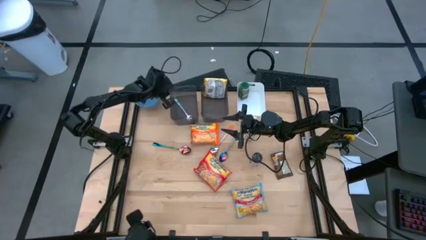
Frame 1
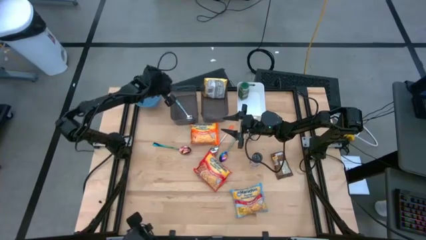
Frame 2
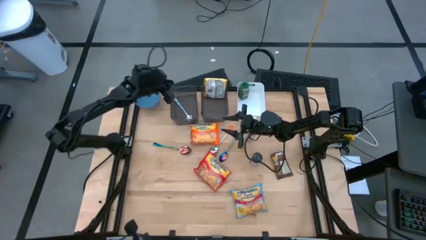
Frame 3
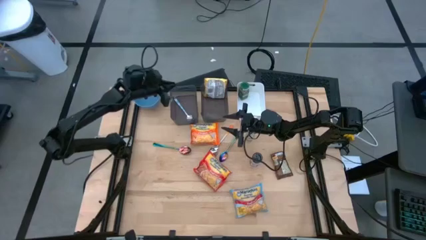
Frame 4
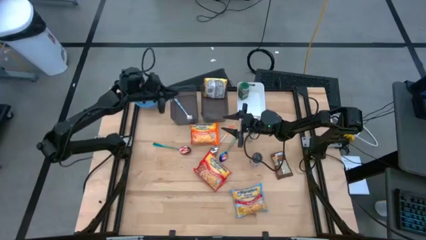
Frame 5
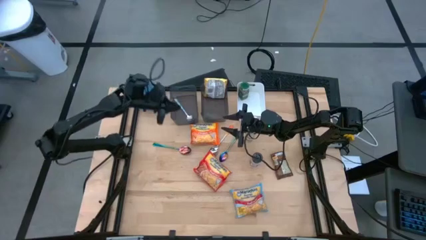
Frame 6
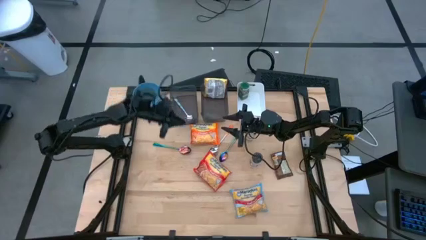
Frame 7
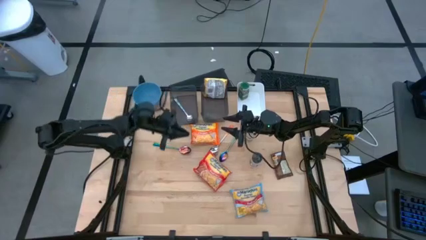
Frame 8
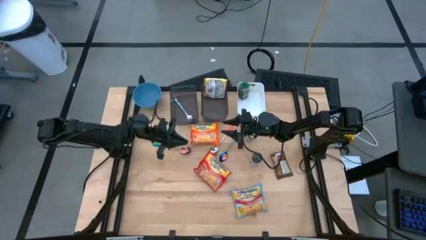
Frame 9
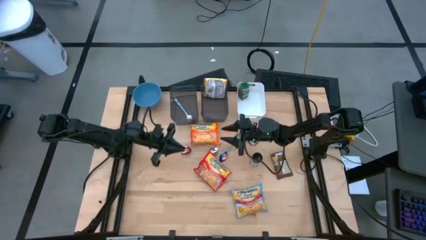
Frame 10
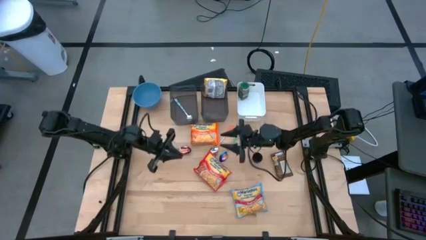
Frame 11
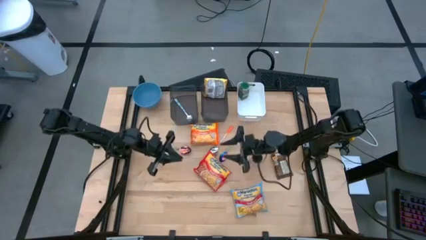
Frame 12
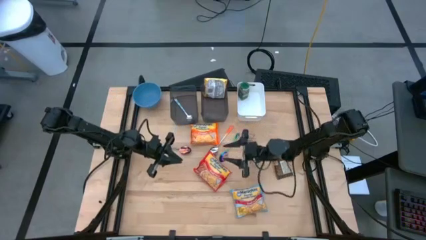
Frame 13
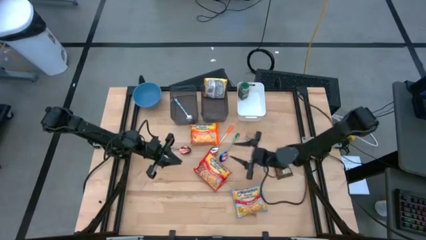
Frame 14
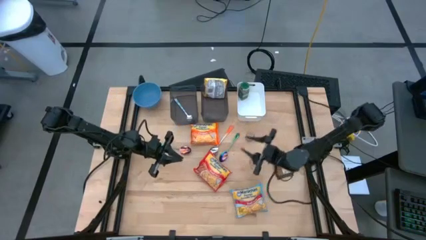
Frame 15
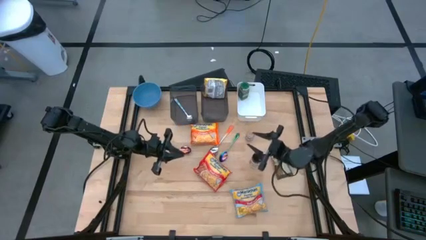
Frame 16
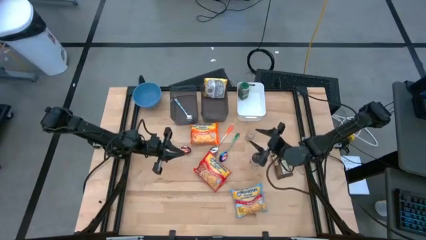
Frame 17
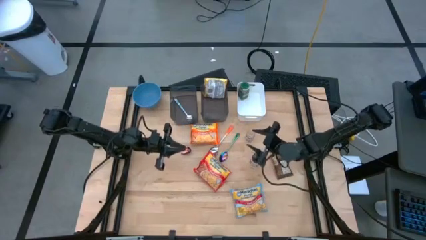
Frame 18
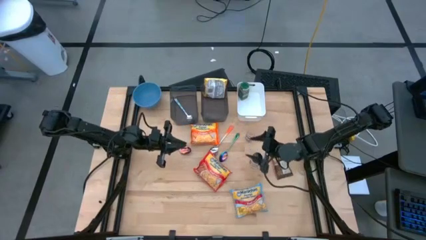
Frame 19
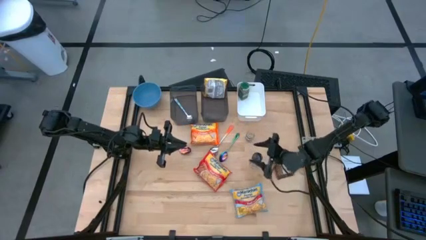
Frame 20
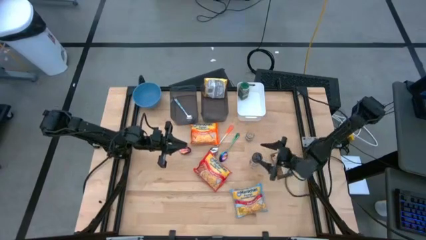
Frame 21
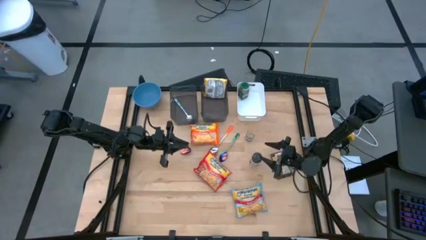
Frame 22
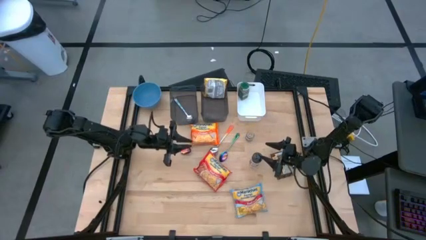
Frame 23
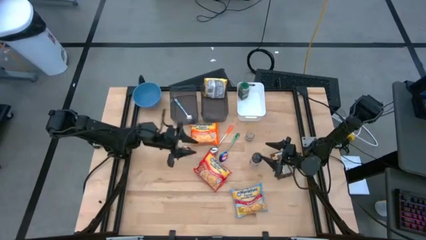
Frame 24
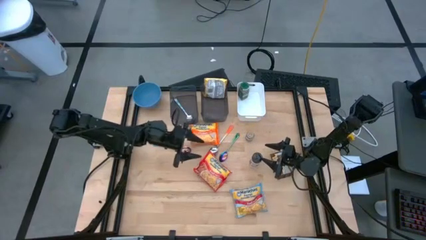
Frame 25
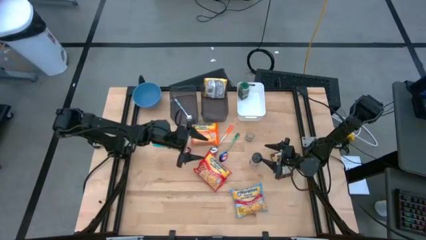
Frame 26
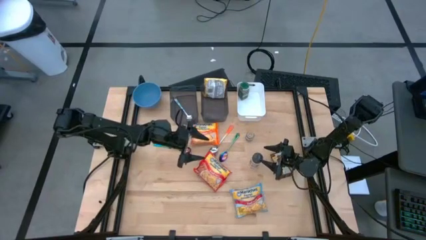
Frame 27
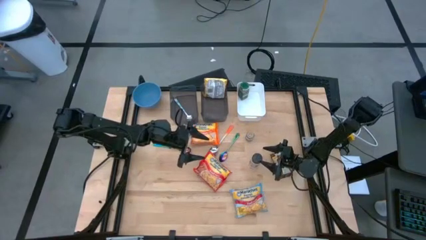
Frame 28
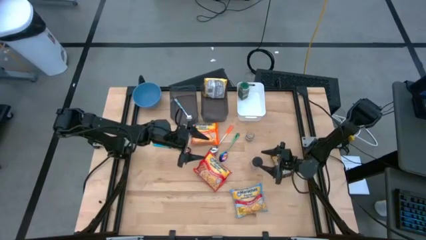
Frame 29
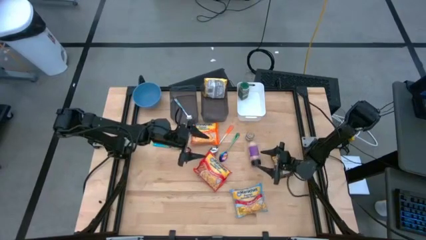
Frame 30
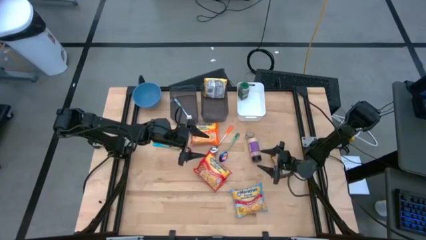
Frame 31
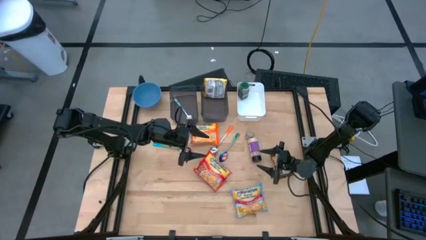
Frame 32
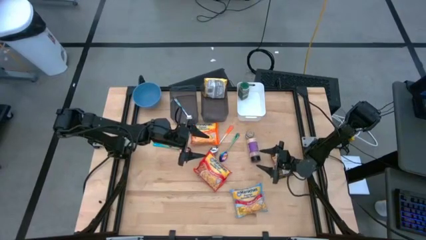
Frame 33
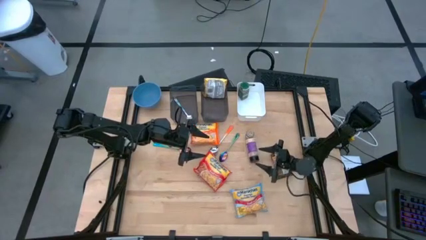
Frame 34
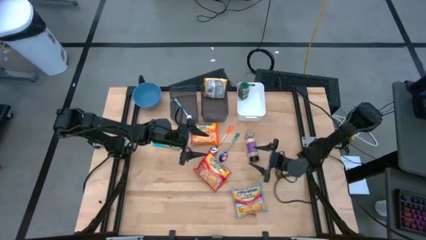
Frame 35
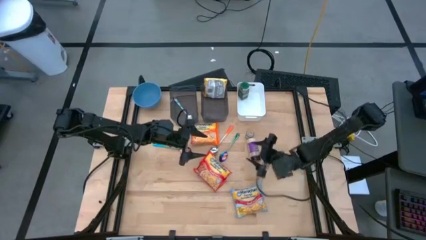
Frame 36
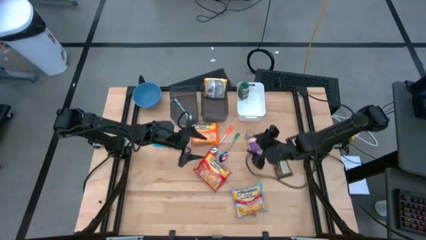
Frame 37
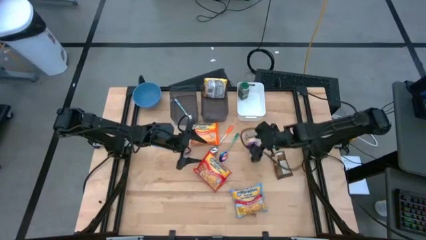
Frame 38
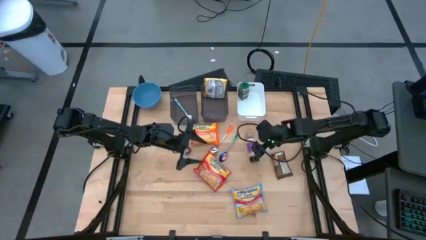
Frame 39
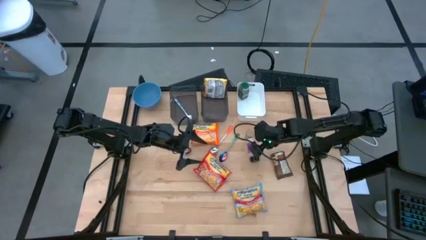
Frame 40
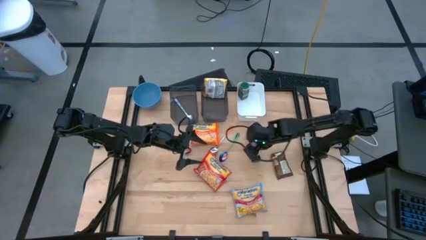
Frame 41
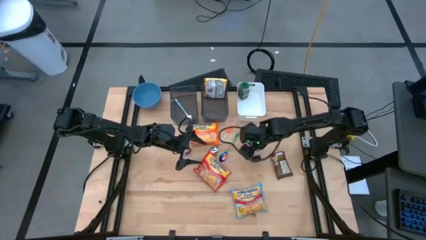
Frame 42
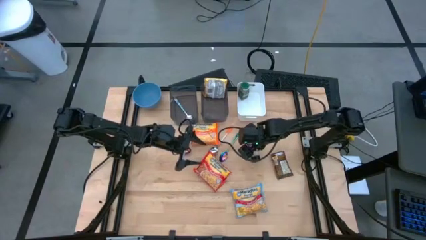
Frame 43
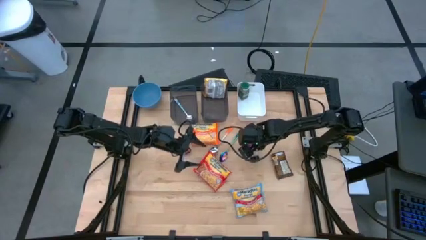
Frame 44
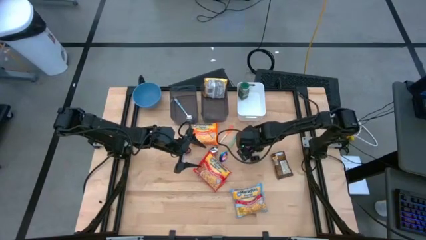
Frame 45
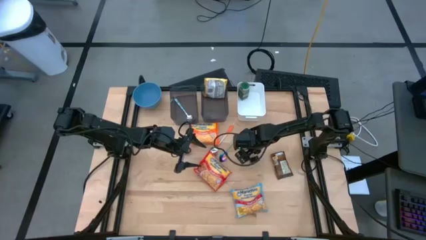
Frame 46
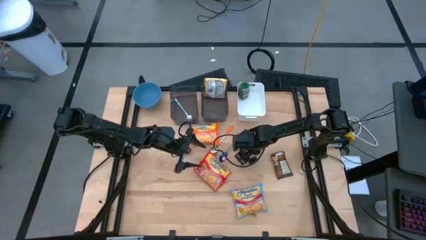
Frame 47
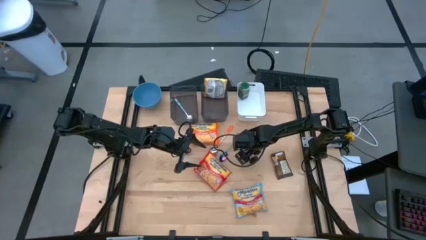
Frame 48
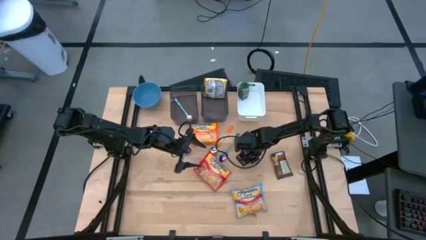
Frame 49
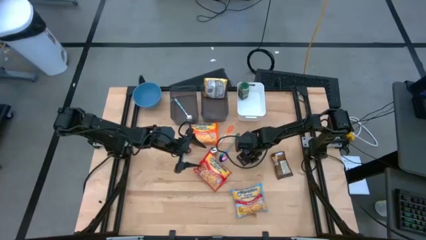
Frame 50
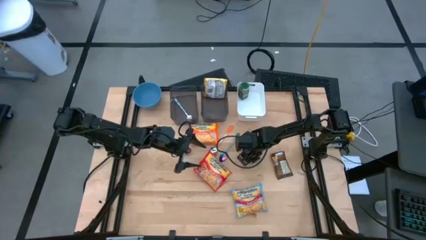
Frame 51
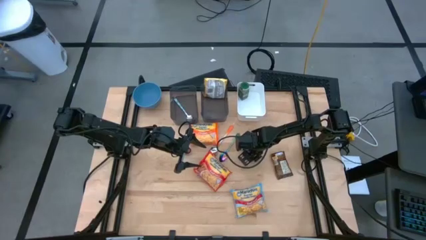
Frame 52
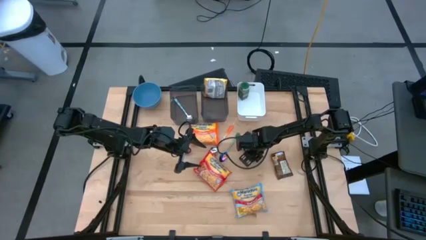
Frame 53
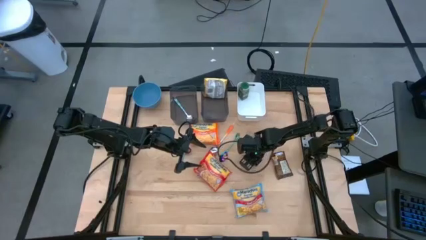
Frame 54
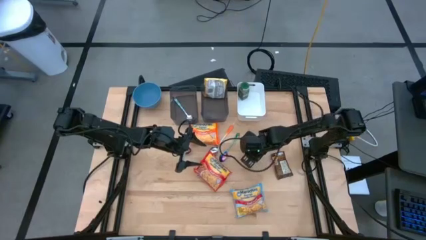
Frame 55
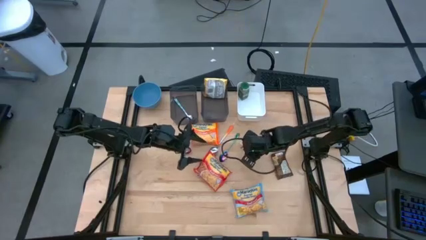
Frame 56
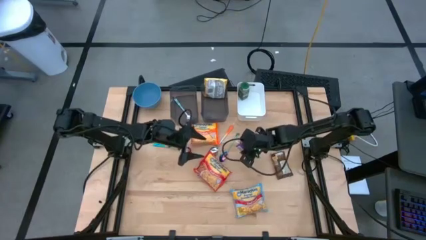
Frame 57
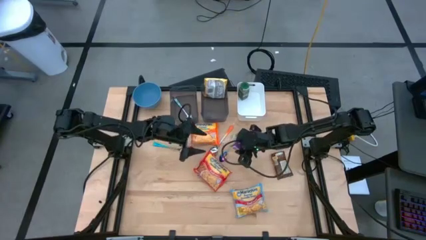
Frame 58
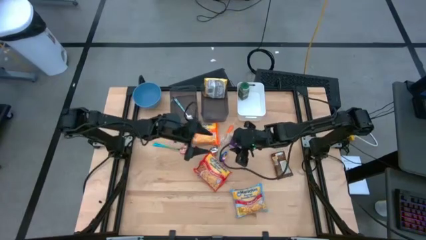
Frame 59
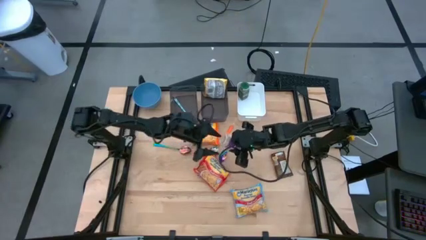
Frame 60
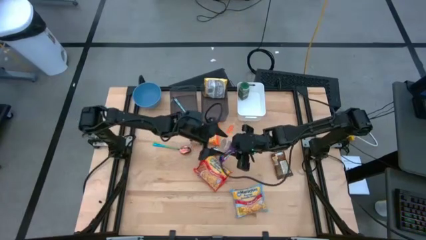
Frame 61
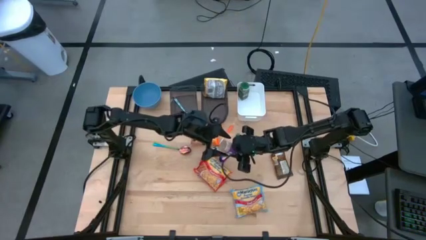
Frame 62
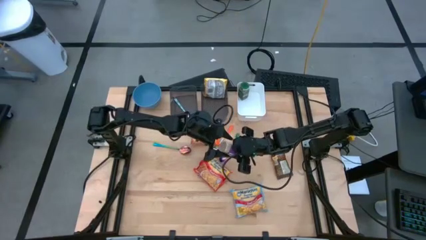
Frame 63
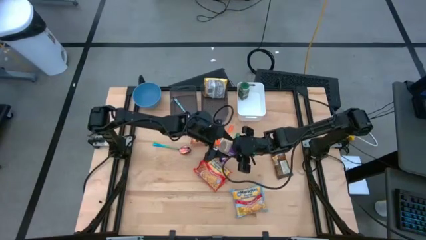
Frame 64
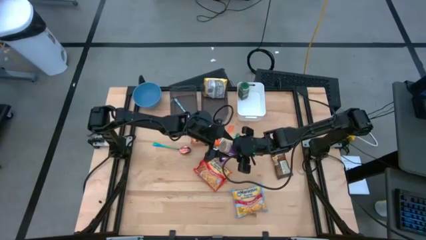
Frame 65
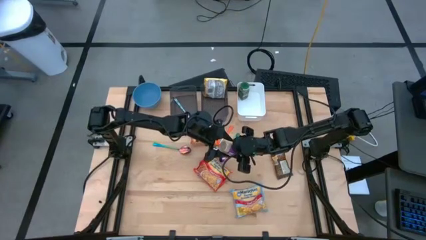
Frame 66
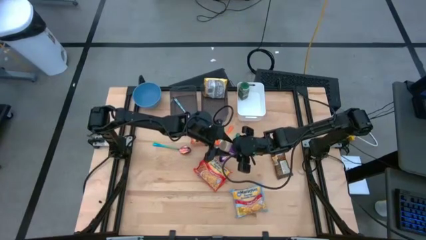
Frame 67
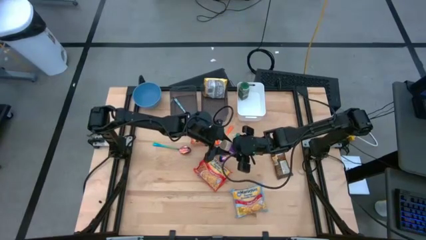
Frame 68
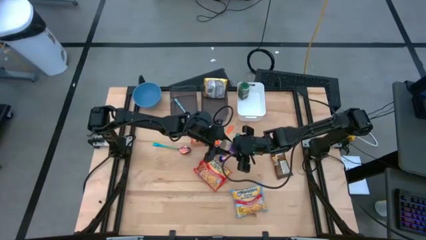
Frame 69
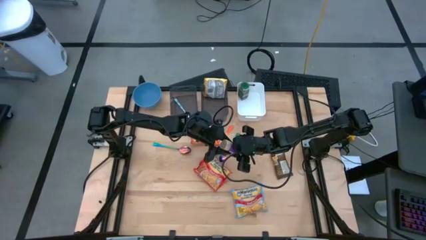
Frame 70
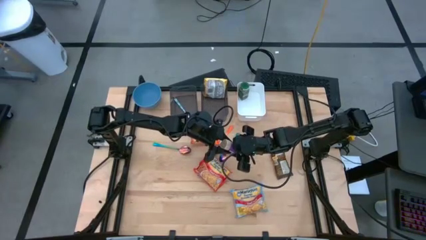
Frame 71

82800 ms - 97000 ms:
Task: Pick & Place Food Item
Put the purple seasoning bottle into the white bin
